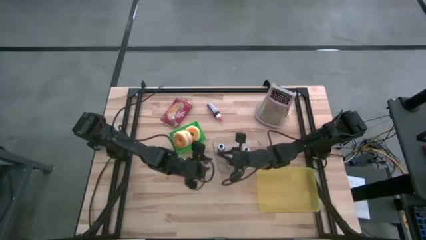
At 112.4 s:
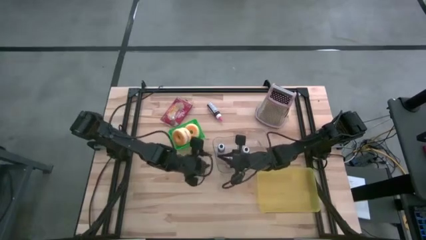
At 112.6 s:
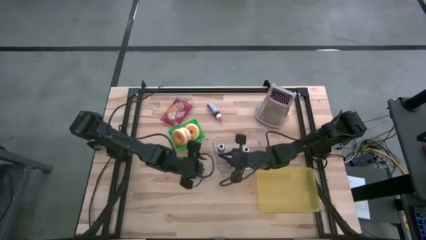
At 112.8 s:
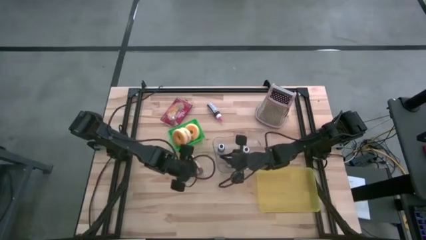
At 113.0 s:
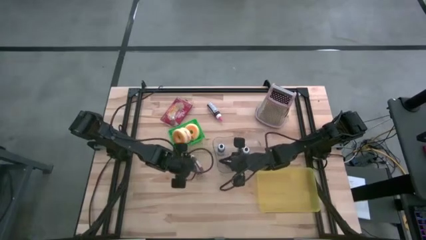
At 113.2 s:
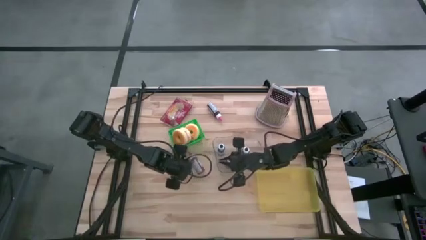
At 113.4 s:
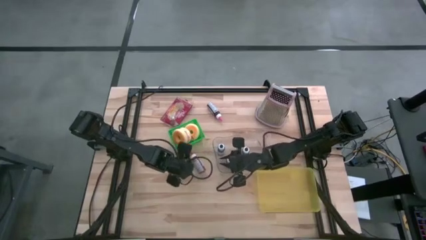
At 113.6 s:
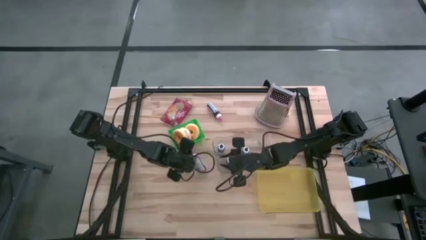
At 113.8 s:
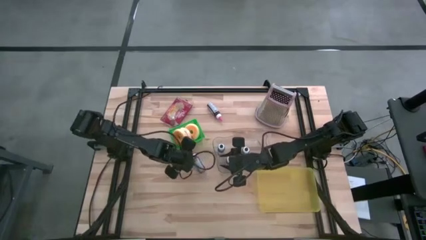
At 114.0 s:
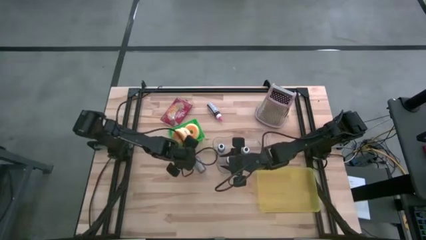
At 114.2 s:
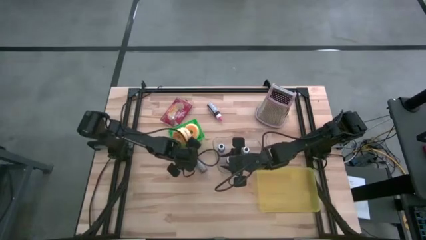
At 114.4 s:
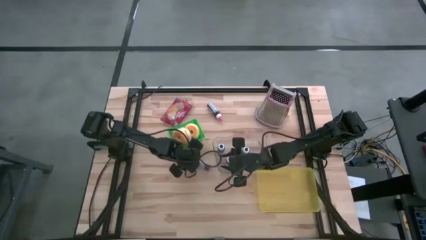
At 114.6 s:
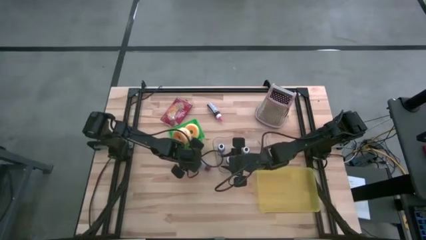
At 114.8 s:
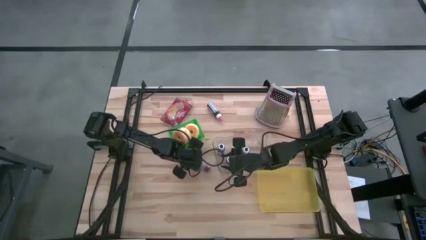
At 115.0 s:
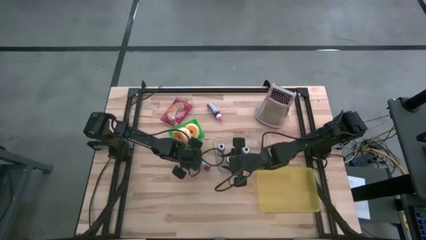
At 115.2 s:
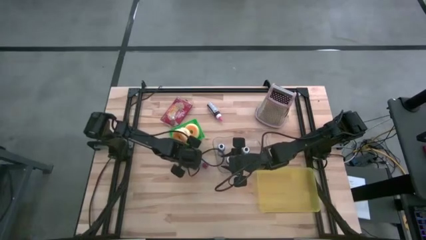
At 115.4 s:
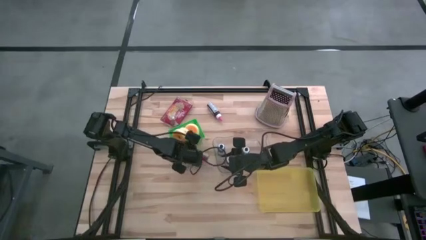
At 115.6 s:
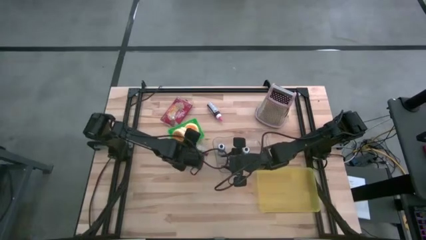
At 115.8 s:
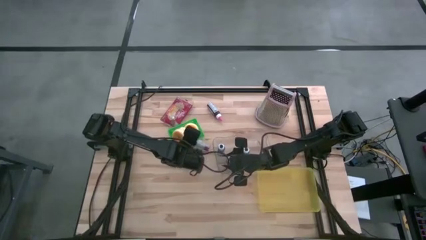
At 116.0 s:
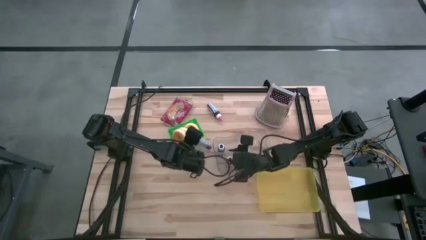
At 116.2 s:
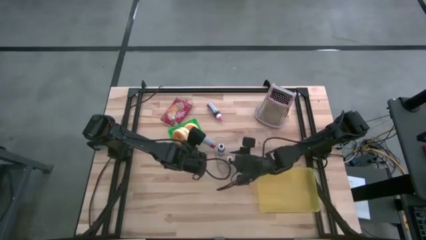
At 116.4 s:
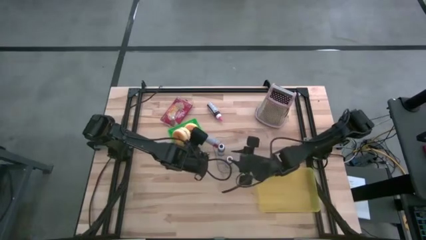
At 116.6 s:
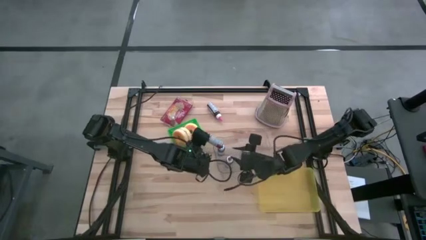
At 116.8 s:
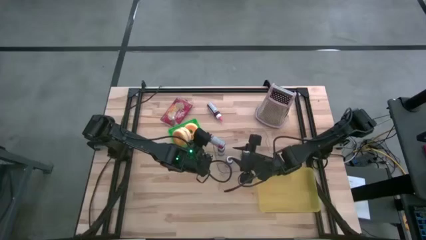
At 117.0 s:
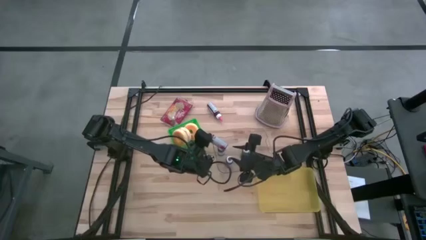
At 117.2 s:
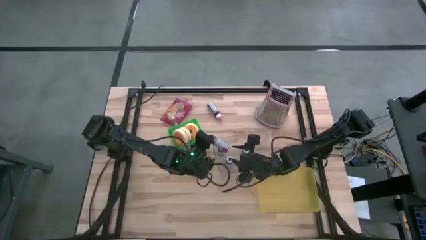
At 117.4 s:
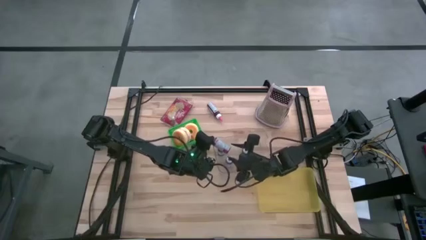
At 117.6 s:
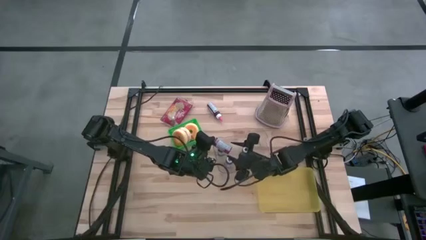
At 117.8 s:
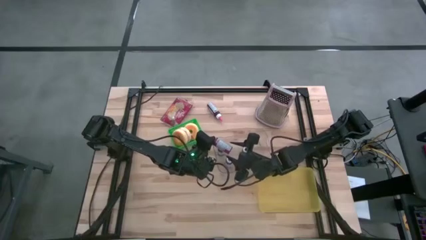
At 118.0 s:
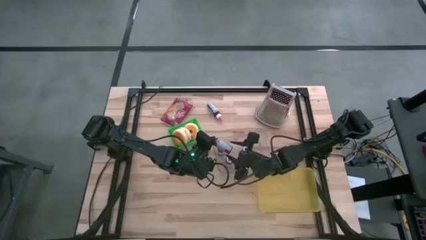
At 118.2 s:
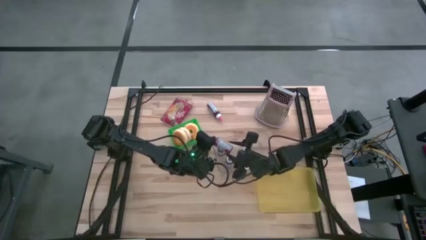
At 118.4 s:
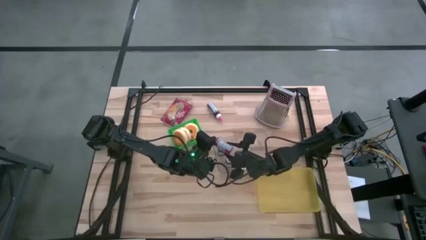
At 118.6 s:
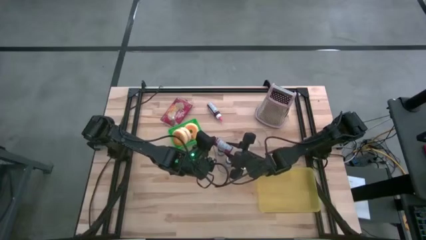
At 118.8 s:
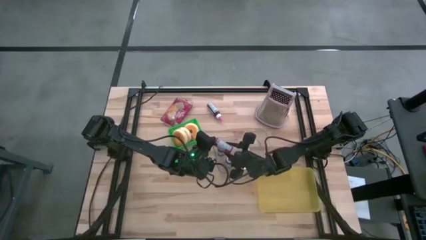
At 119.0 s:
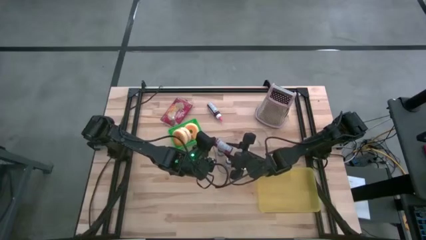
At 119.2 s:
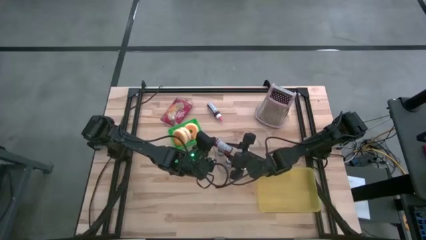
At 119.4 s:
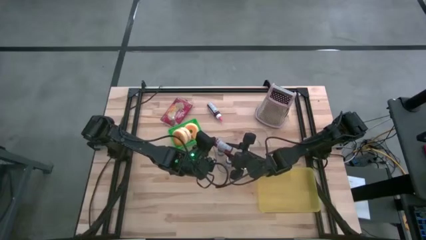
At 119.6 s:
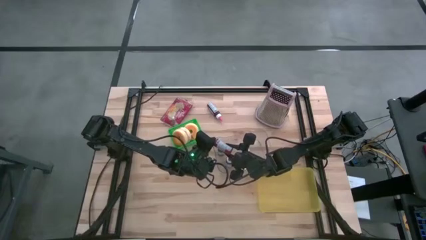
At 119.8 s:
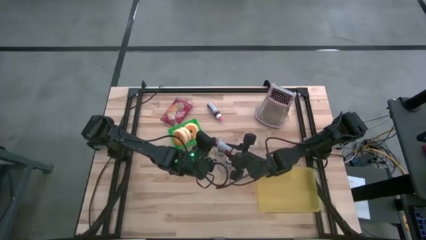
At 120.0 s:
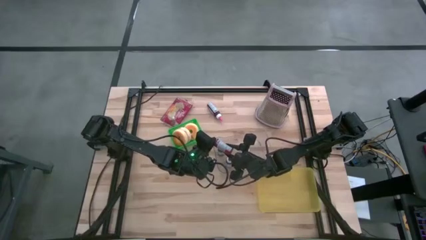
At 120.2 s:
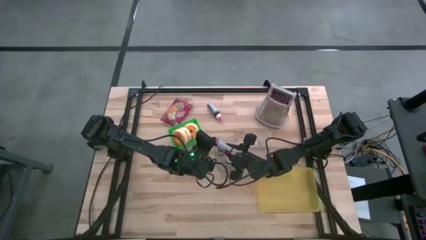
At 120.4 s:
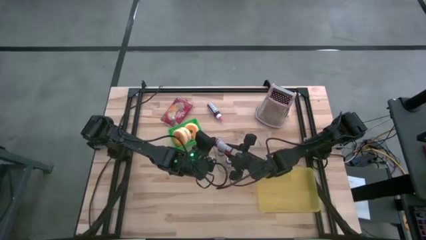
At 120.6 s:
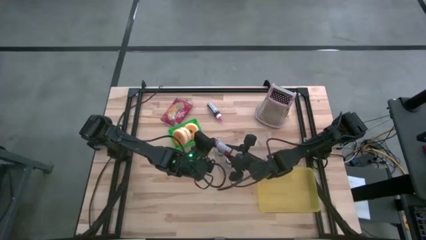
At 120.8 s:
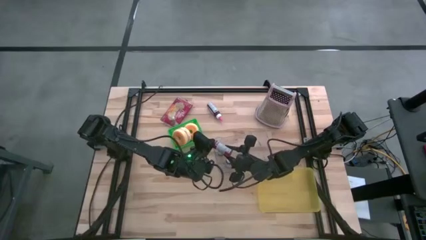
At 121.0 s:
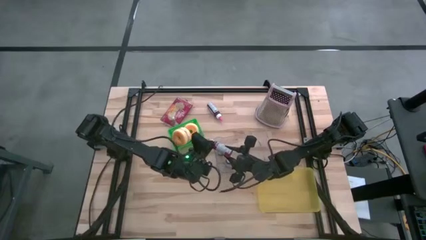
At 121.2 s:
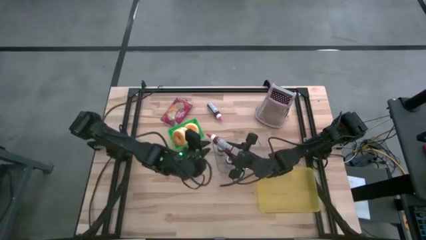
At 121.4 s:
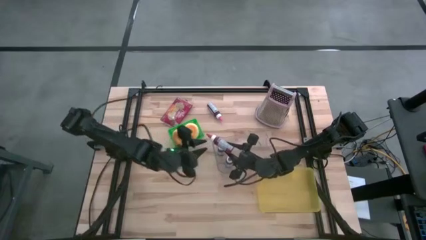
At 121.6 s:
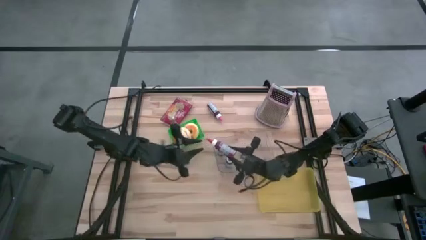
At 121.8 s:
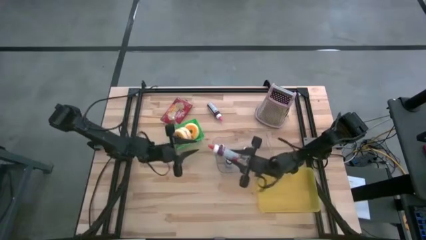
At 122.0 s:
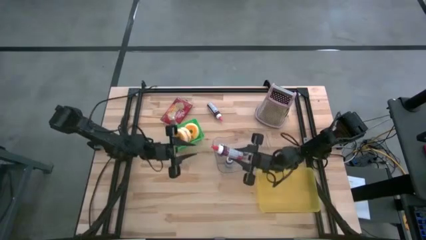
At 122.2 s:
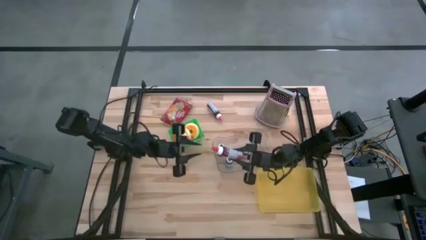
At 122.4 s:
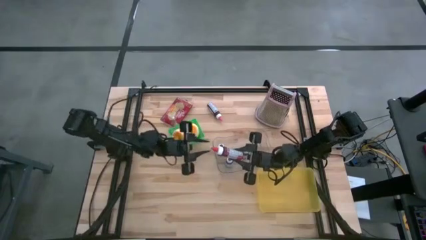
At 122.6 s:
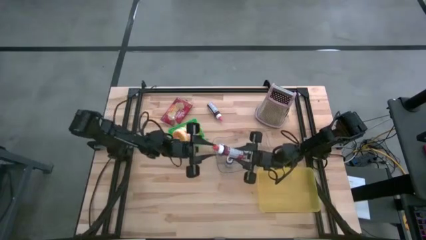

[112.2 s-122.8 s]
Task: Pick & Place Food Item
Put the red food coloring bottle into the transparent bin

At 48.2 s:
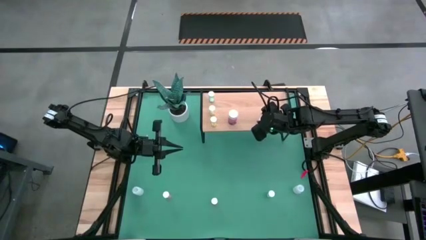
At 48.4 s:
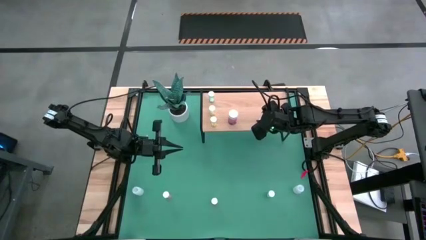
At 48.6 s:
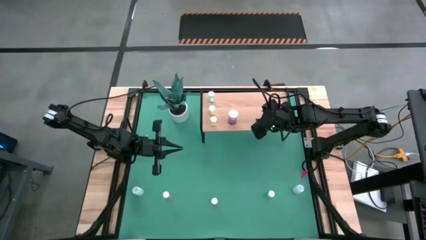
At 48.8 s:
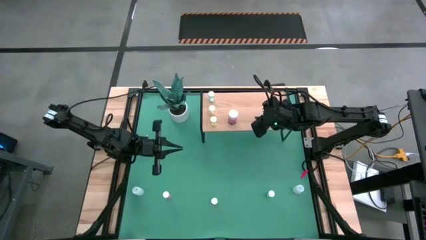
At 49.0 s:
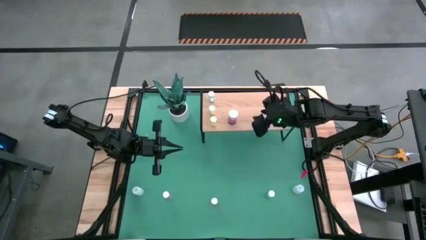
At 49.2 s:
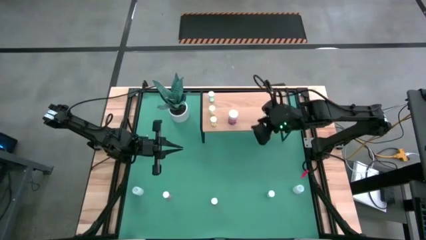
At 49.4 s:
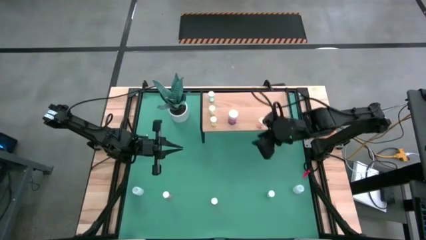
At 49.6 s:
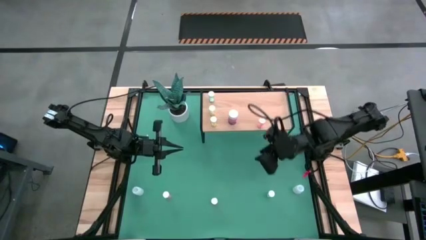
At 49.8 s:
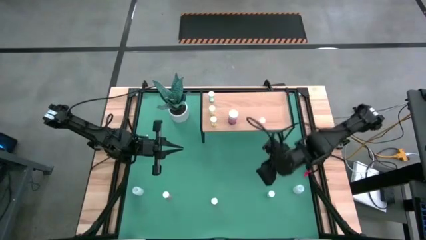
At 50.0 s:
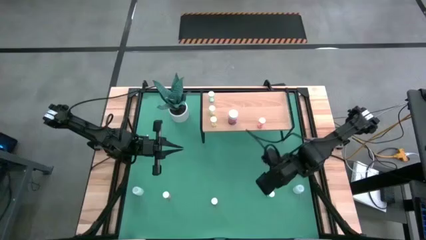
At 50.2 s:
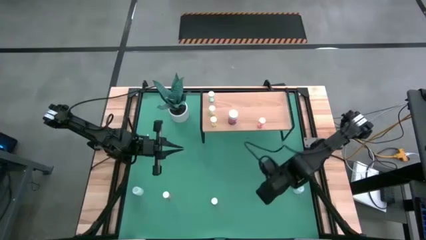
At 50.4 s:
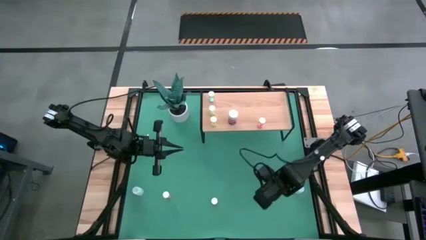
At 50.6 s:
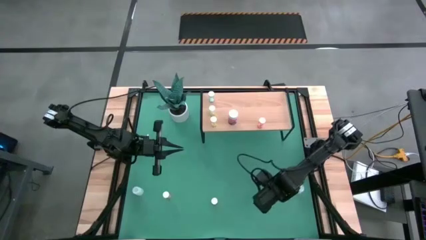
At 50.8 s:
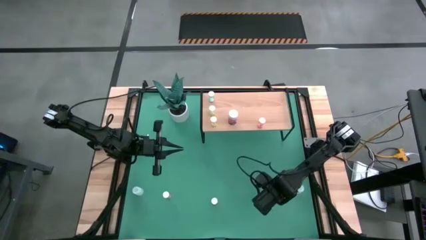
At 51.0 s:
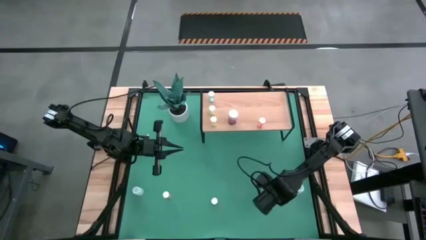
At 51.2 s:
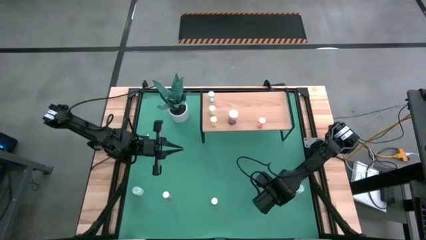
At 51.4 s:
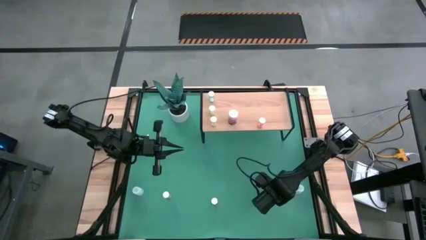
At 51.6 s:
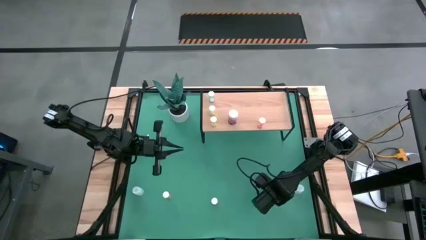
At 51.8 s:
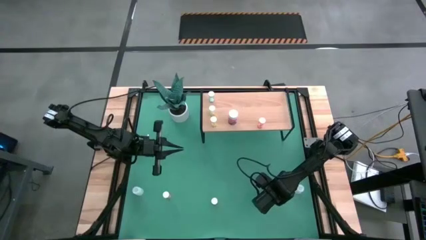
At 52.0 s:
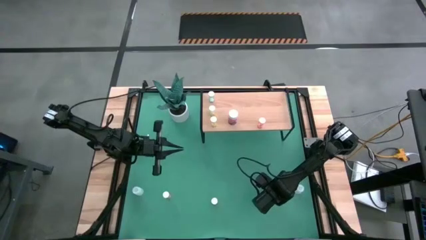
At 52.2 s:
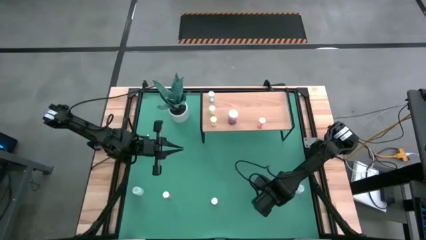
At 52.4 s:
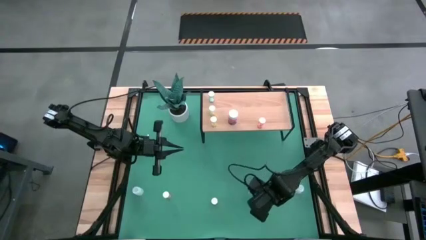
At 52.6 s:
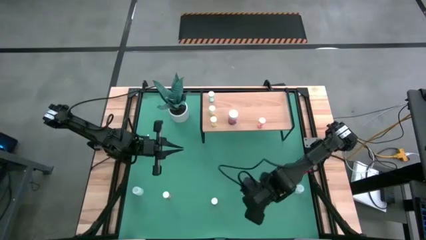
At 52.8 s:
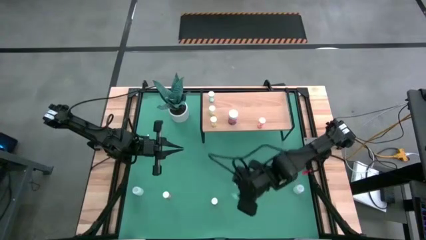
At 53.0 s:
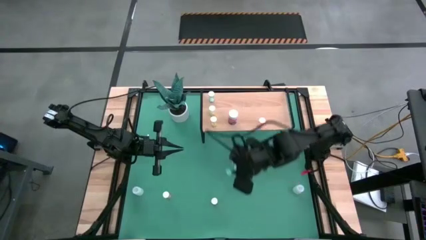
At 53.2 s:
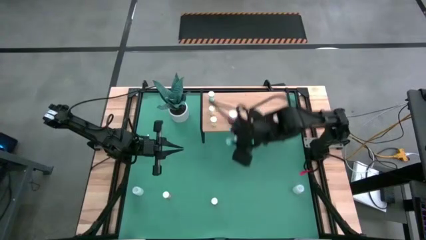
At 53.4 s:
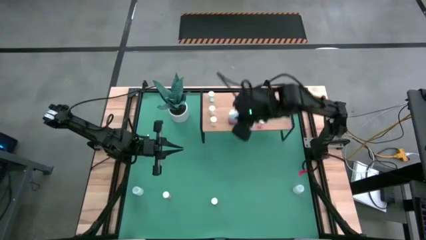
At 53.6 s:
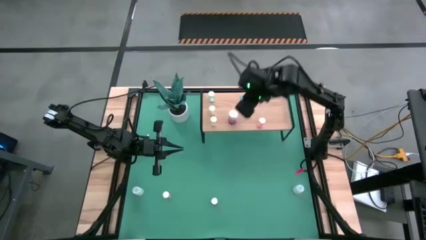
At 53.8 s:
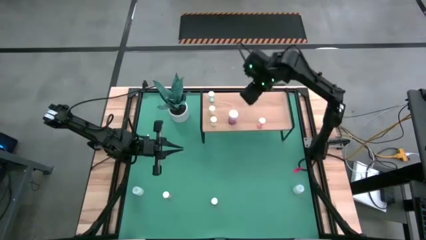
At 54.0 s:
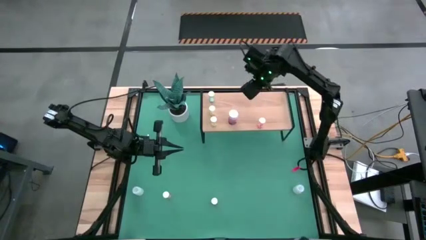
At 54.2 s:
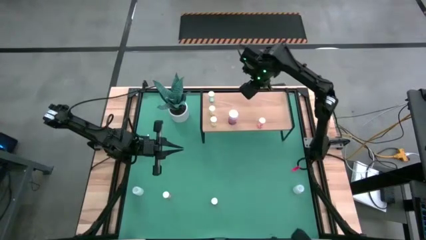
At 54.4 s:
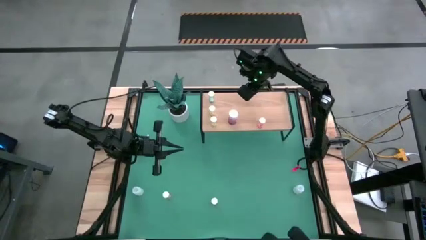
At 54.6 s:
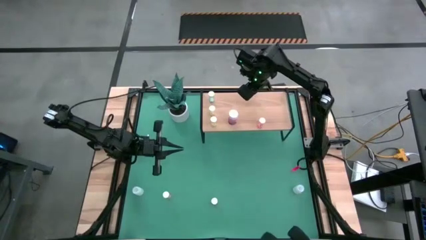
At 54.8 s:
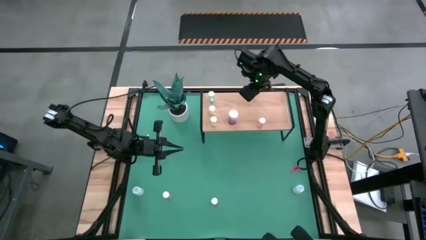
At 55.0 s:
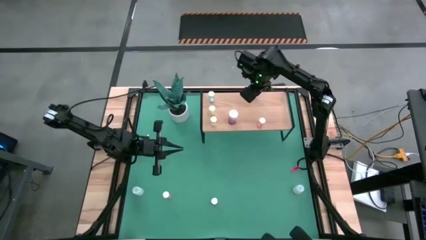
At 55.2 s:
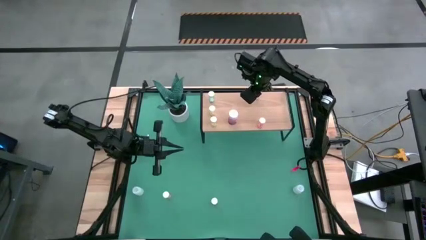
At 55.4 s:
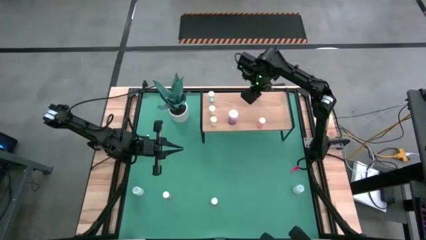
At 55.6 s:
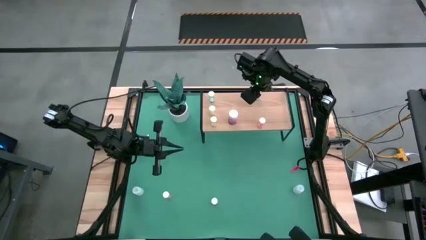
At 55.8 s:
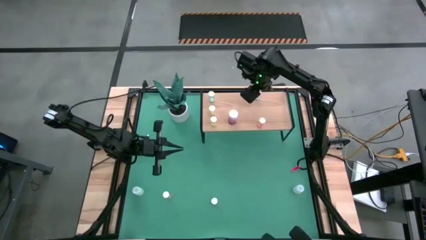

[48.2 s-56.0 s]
Task: Pick and place medicine bottles onto shelf by color
Put the blue pill bottle on the shelf
